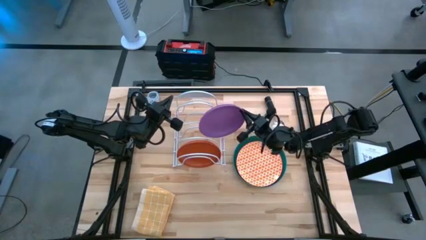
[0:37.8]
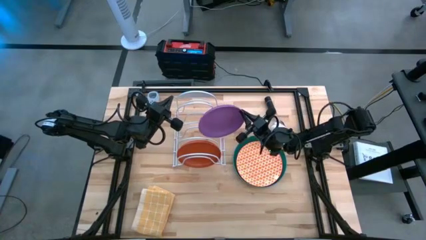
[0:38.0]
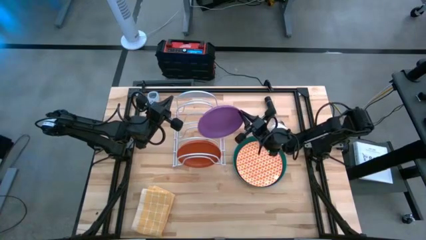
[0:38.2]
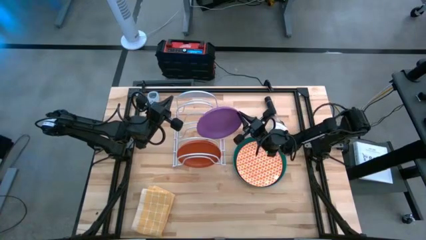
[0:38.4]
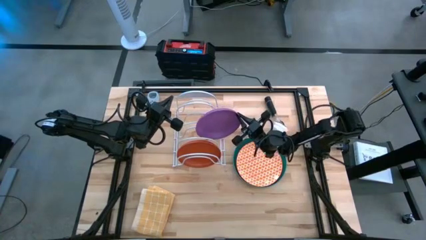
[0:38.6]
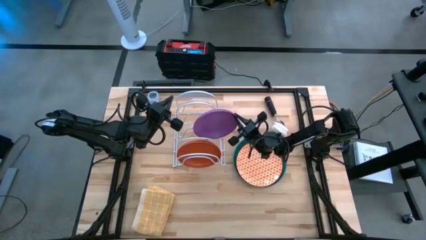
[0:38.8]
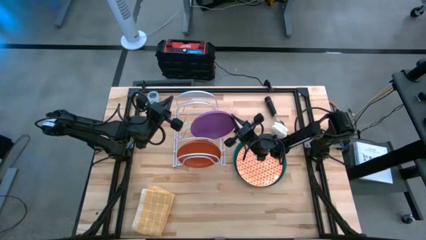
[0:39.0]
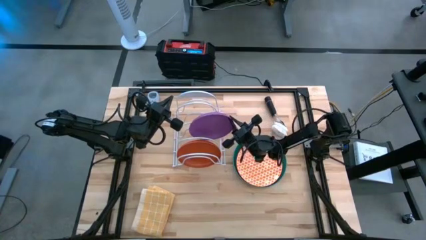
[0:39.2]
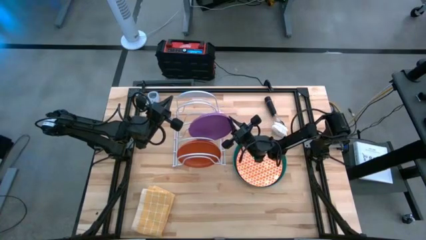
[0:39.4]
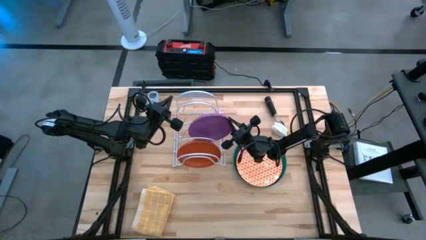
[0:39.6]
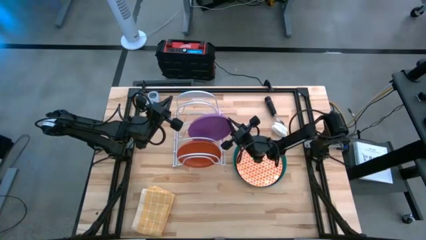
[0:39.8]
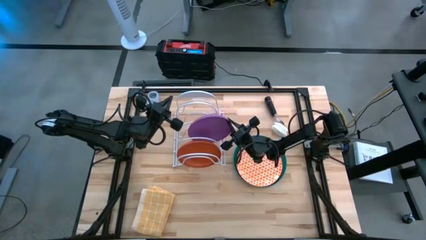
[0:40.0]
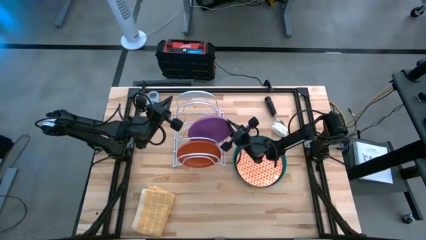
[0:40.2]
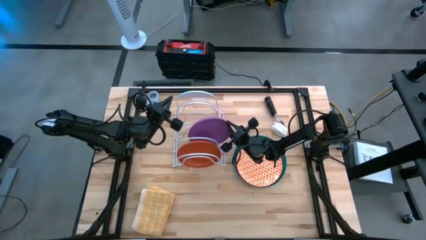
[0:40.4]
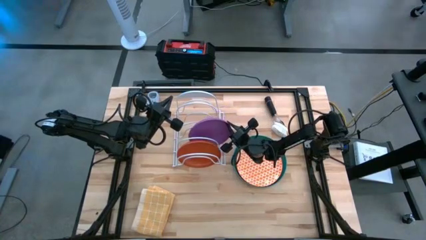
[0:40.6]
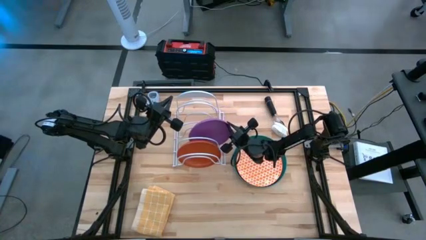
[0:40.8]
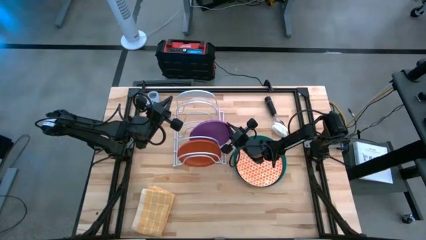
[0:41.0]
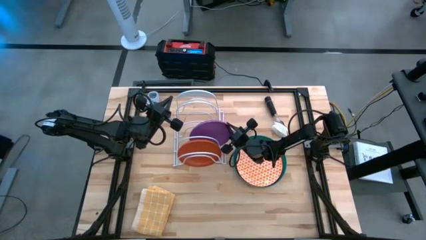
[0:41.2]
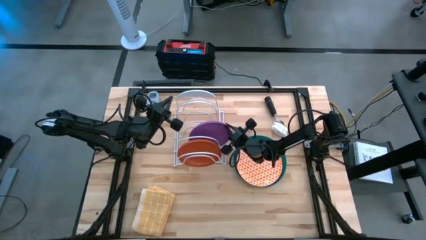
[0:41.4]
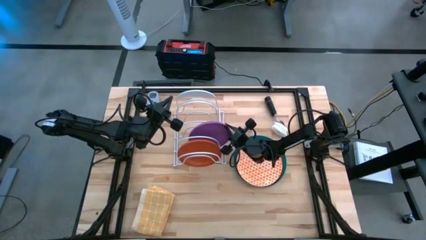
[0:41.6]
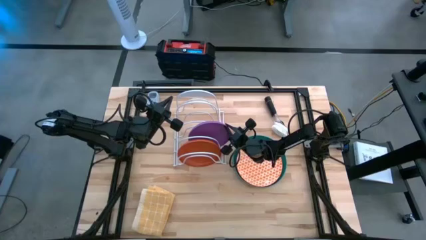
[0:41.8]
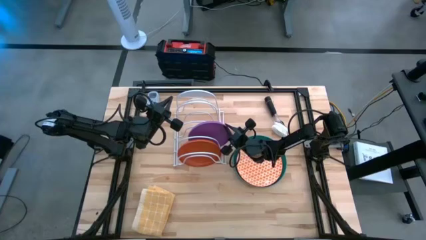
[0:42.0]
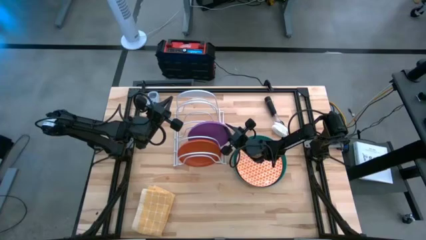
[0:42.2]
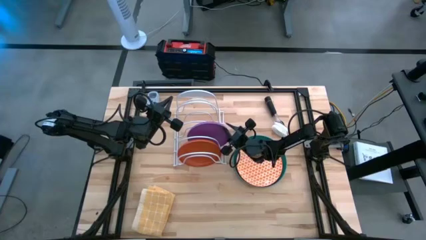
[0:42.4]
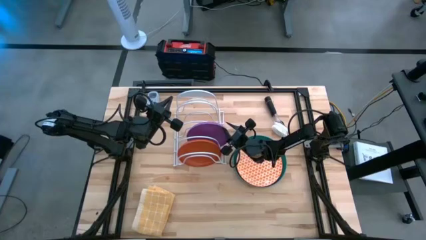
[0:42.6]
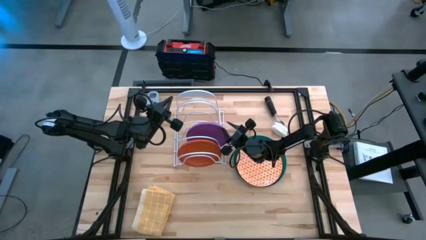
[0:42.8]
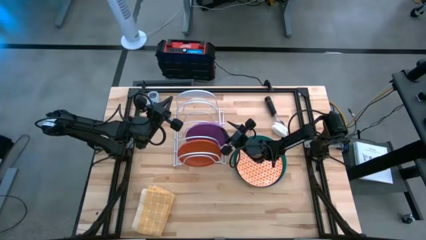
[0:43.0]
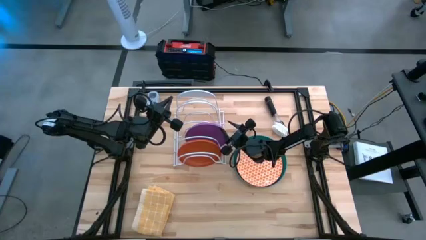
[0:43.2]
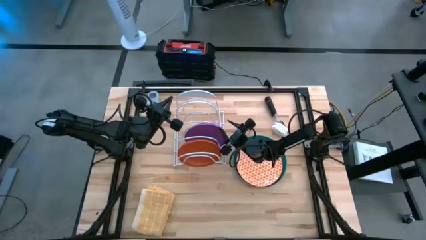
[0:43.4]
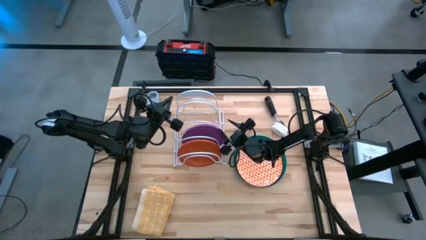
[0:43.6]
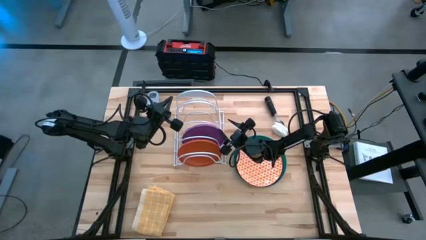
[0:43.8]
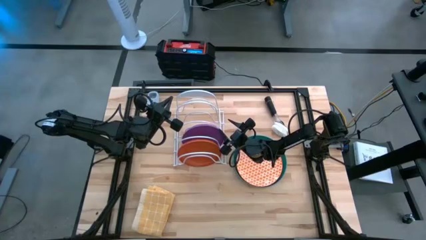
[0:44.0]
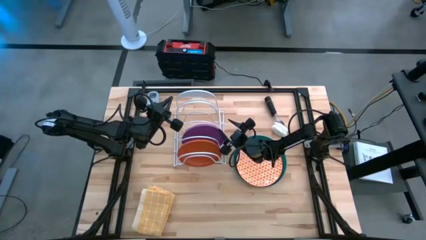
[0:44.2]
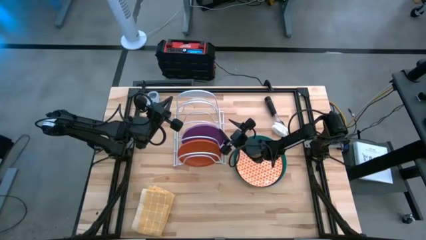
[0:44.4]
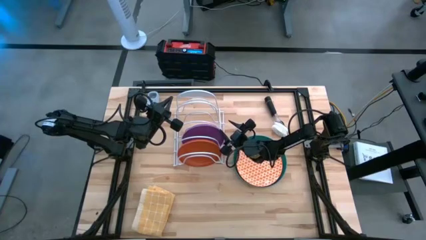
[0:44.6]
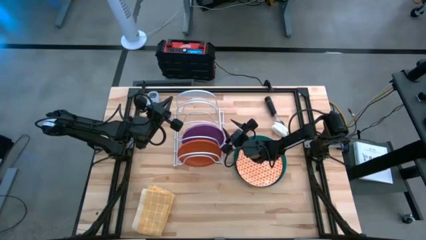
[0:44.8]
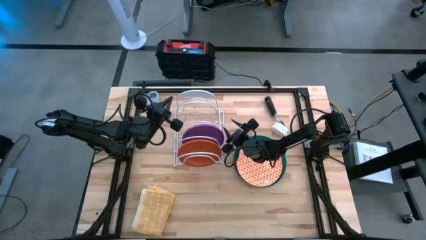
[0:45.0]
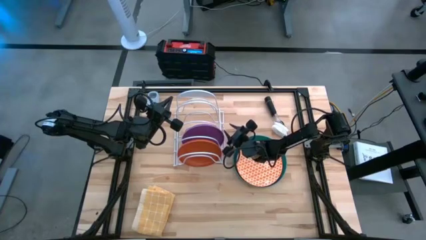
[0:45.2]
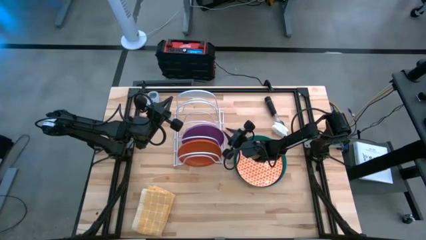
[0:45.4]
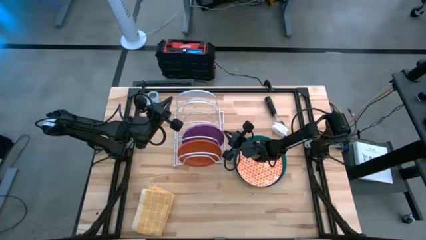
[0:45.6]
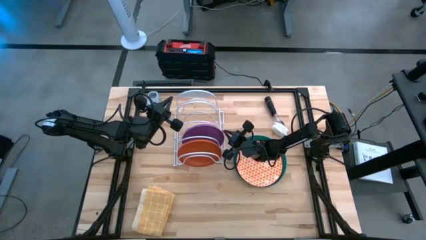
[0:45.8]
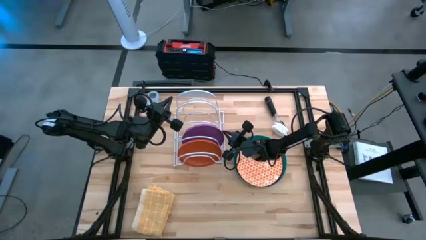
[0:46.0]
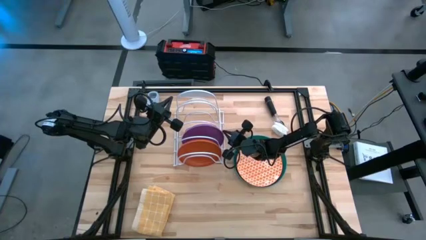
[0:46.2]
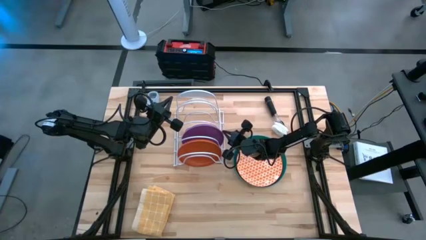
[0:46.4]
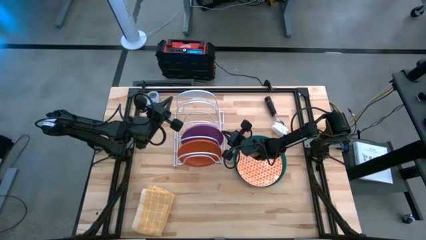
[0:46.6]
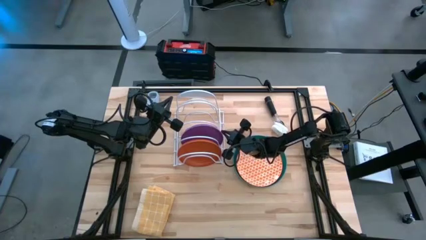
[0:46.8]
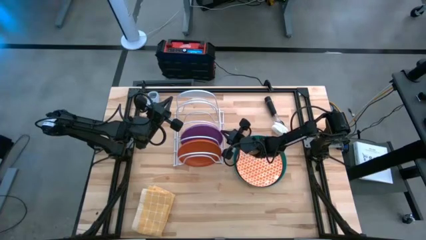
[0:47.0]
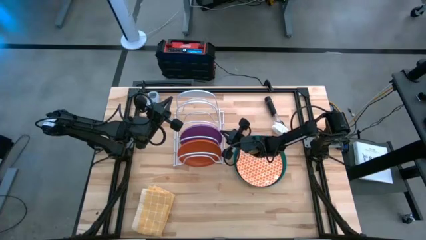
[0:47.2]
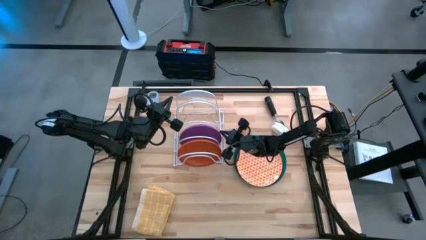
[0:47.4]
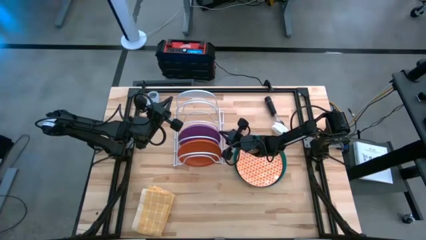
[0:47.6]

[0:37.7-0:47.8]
Task: Sort dishes
Put the purple plate into the dish rack

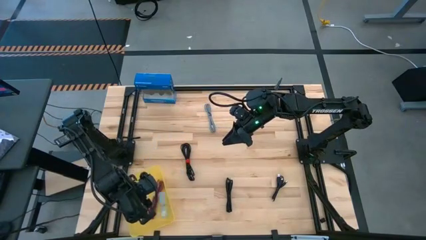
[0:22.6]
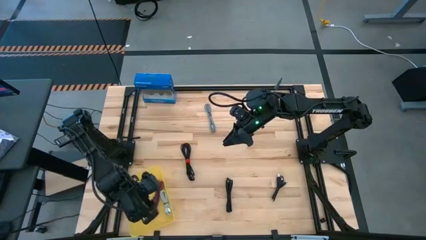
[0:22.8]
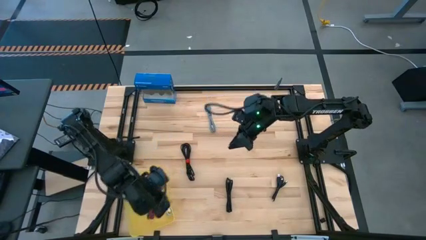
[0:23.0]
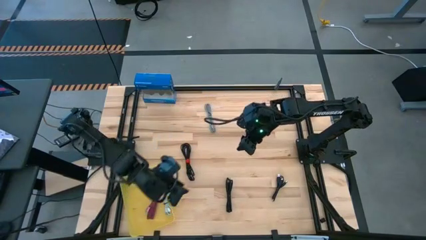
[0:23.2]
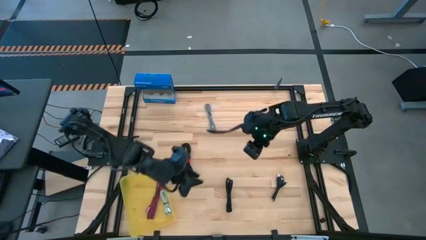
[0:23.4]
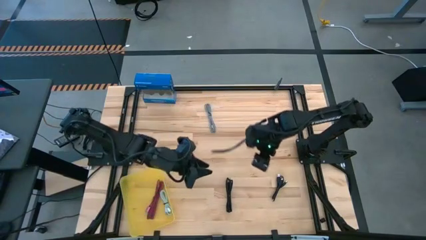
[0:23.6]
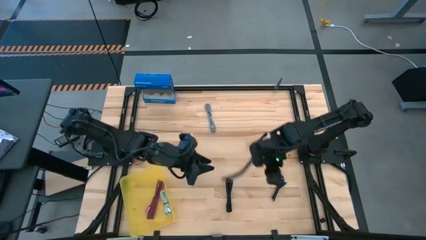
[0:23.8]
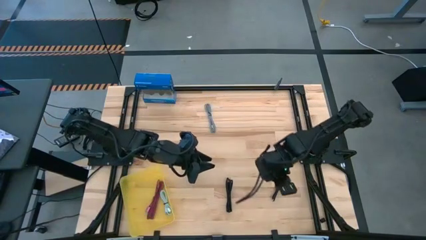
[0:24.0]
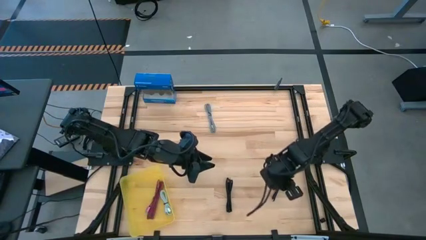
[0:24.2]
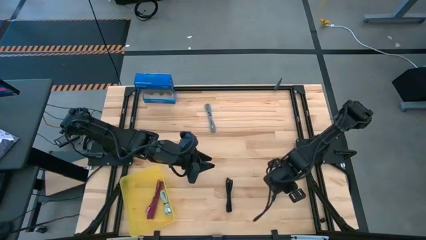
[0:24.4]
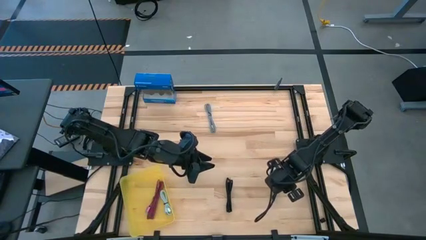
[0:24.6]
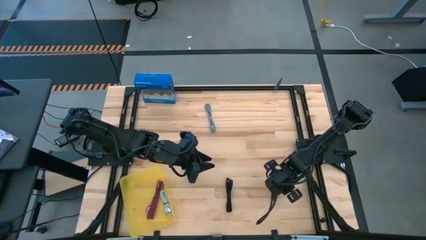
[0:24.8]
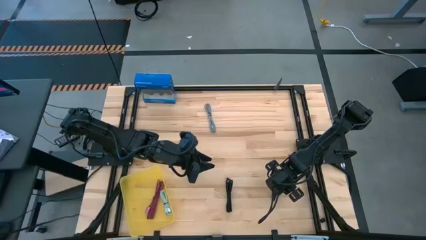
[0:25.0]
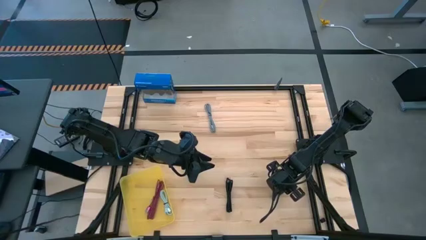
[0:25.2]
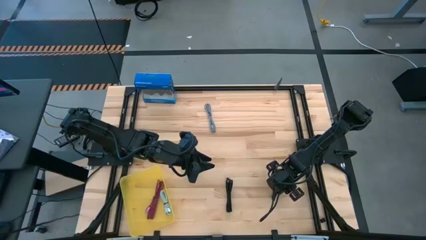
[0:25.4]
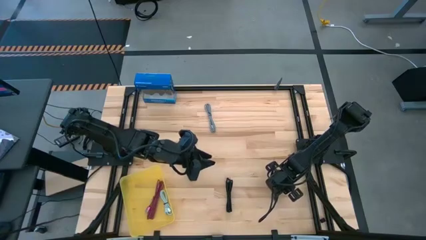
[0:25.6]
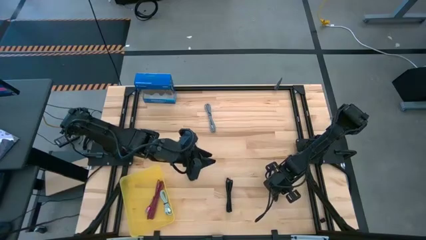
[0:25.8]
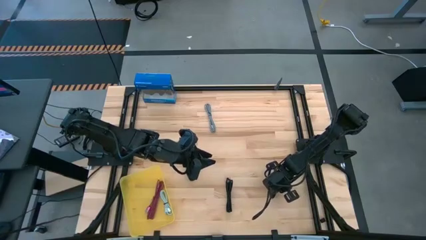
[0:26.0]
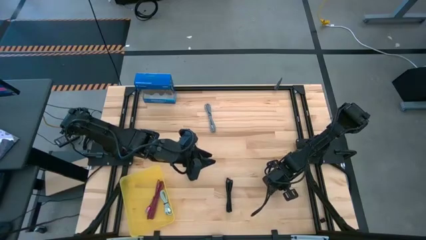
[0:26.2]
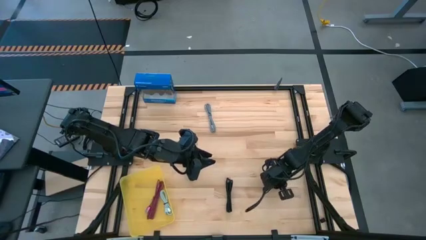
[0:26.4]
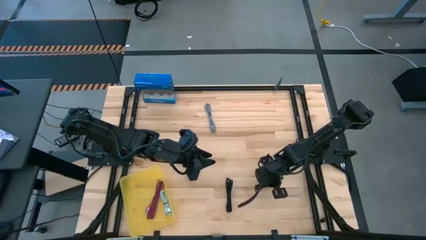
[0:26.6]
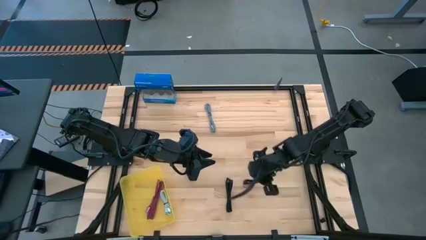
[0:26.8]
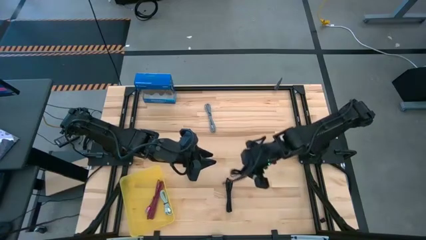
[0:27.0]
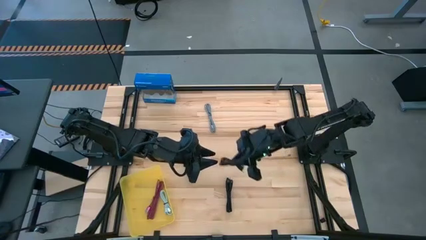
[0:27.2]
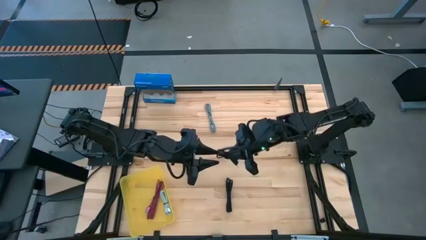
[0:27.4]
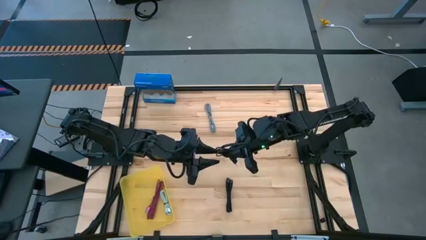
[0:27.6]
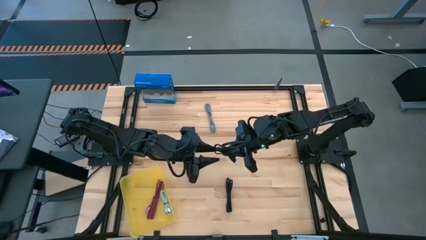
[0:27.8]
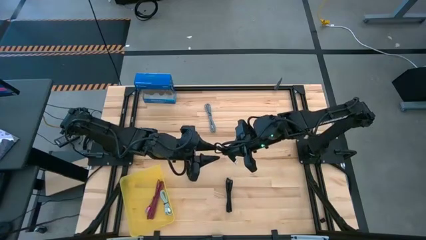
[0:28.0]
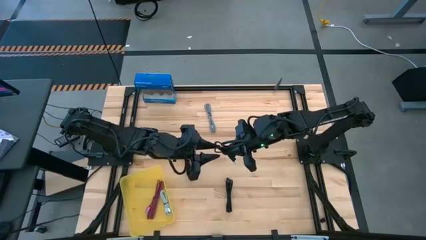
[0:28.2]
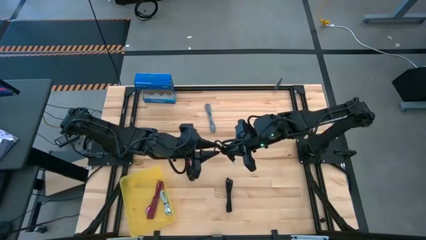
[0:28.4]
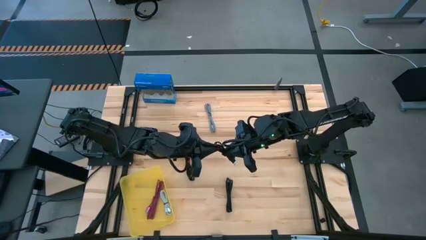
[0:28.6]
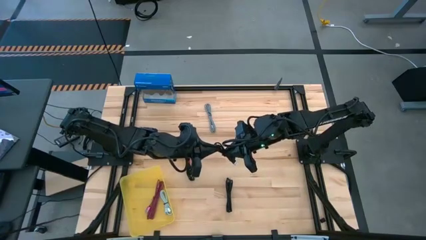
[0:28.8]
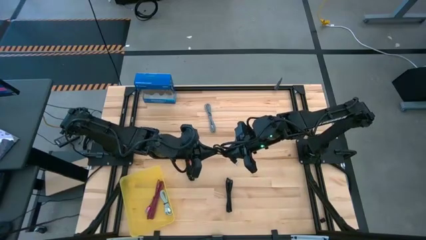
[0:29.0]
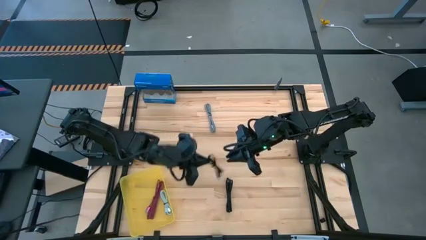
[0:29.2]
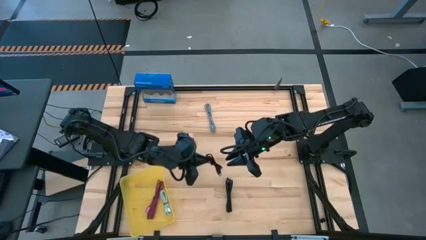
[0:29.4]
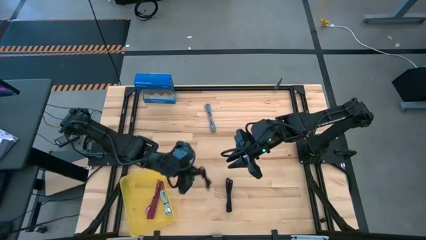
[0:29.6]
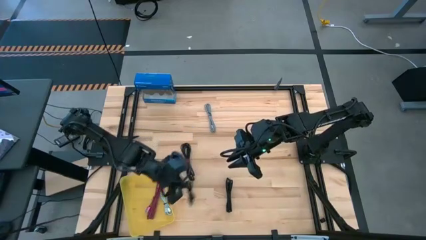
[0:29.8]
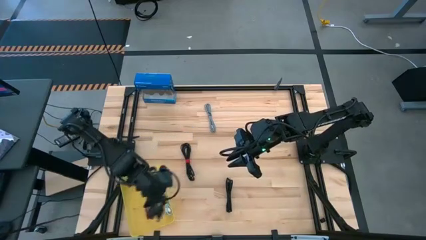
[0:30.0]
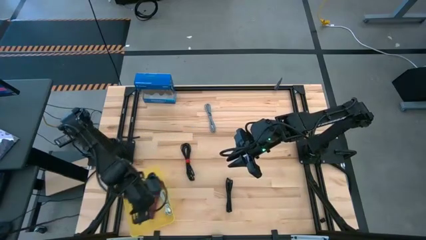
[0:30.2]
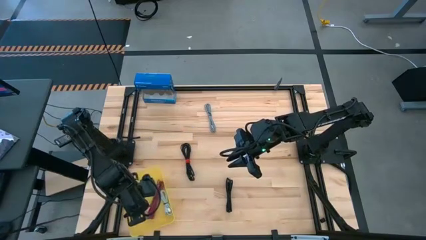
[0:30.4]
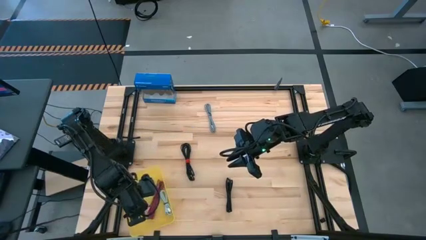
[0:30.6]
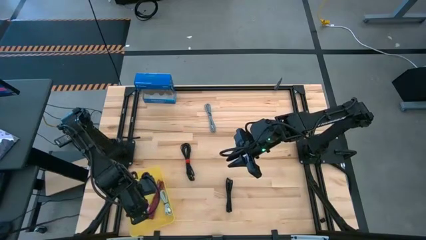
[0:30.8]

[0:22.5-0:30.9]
Task: Pick and place USB-C Cables
Put the right black charger cable into the yellow bin
